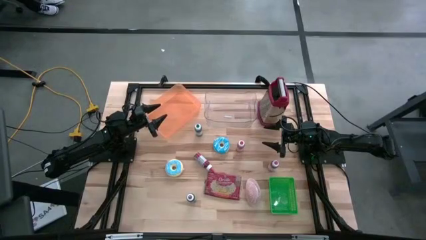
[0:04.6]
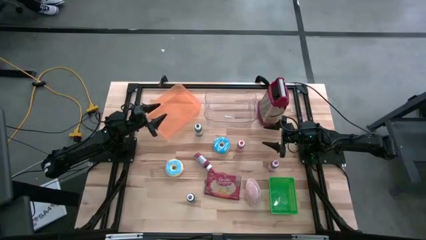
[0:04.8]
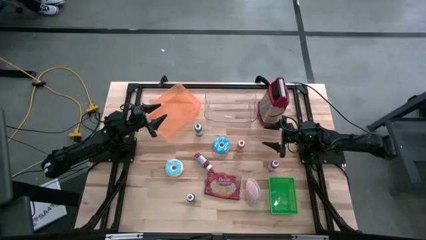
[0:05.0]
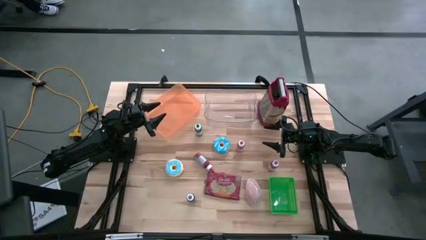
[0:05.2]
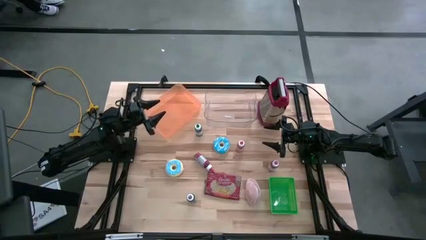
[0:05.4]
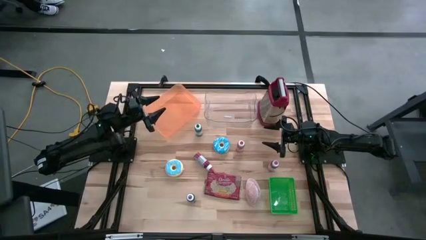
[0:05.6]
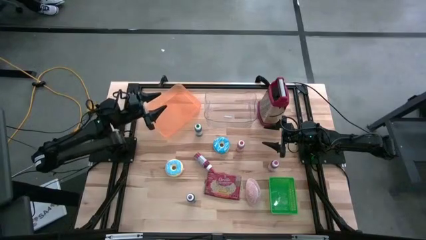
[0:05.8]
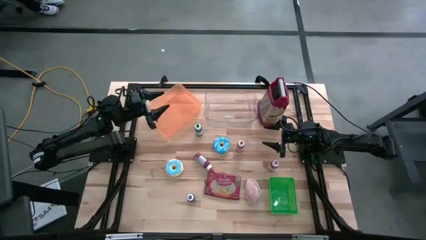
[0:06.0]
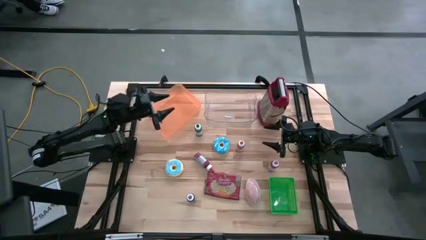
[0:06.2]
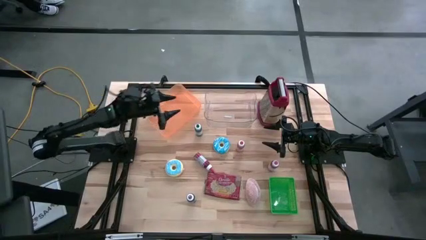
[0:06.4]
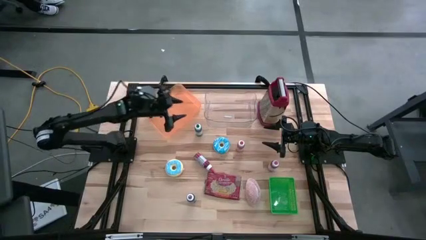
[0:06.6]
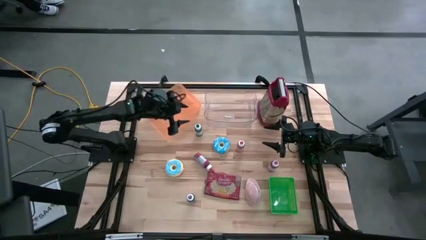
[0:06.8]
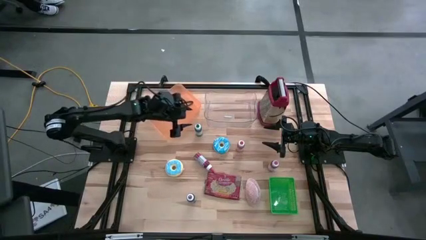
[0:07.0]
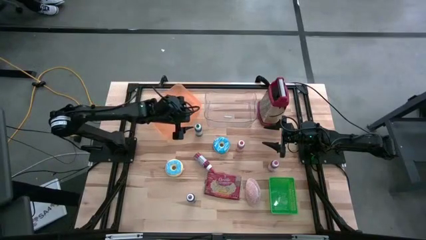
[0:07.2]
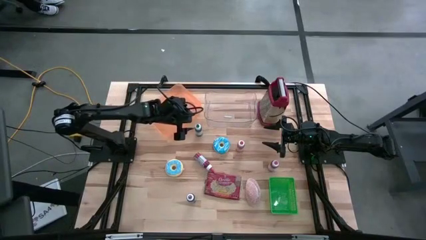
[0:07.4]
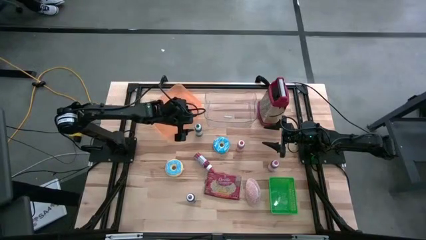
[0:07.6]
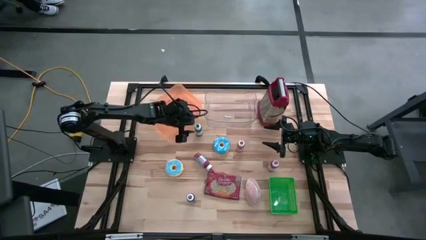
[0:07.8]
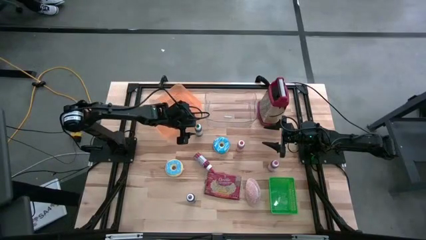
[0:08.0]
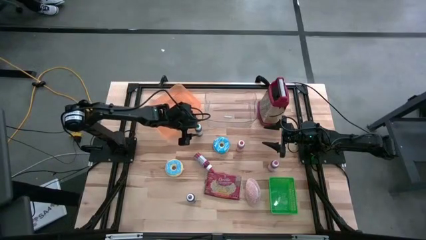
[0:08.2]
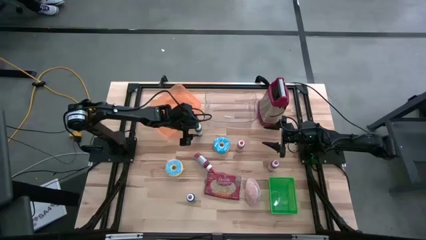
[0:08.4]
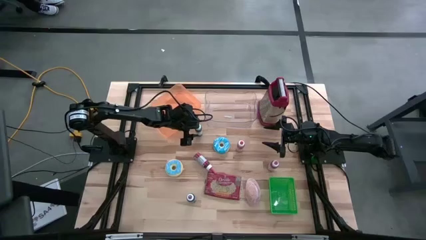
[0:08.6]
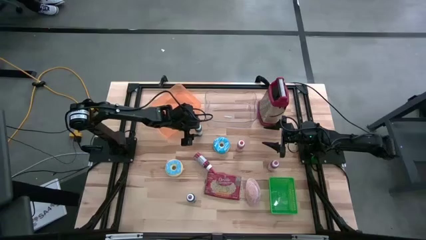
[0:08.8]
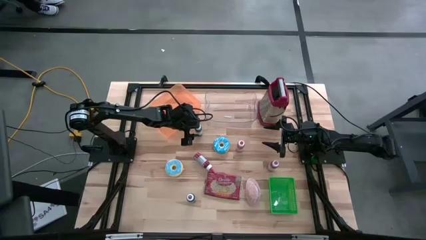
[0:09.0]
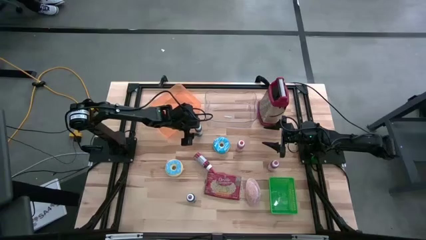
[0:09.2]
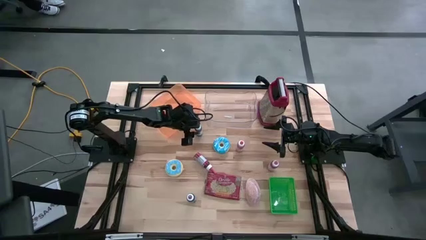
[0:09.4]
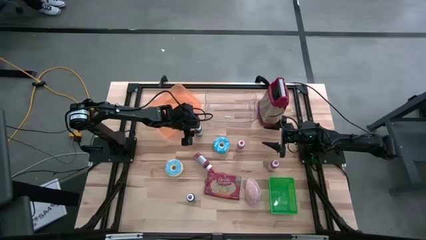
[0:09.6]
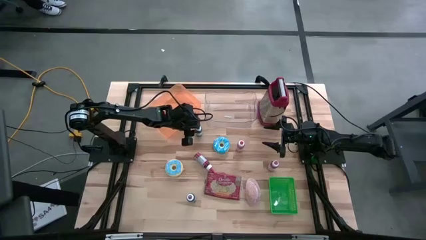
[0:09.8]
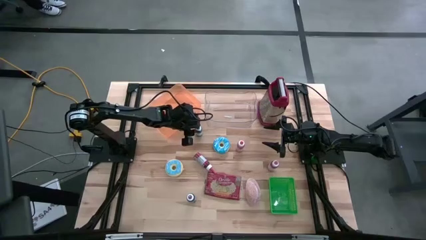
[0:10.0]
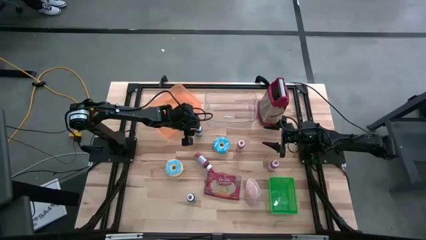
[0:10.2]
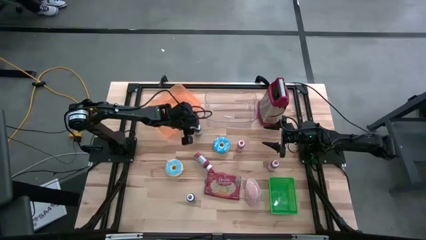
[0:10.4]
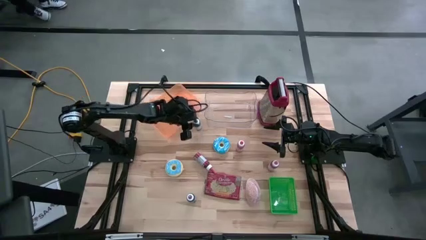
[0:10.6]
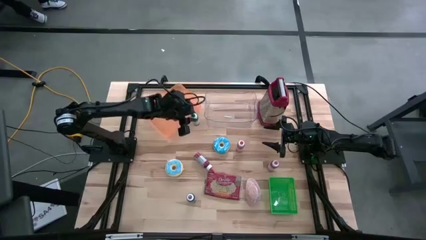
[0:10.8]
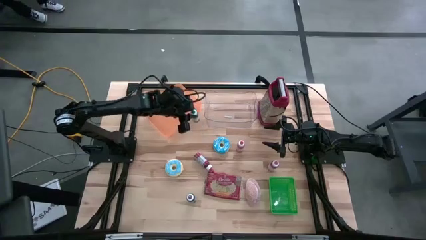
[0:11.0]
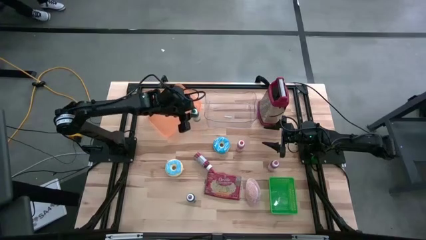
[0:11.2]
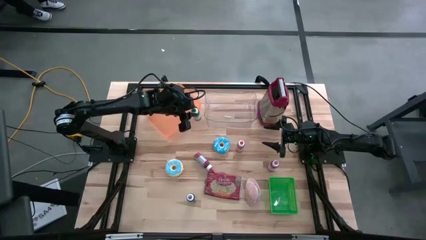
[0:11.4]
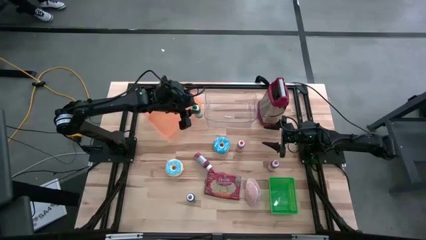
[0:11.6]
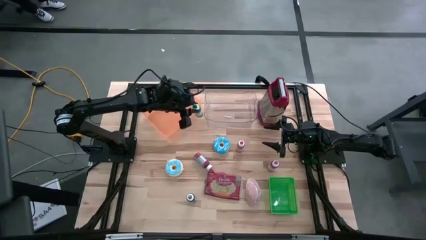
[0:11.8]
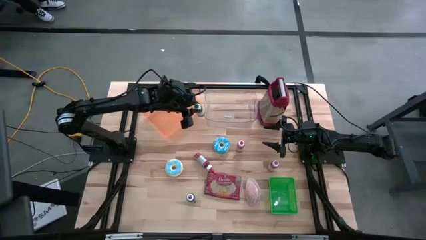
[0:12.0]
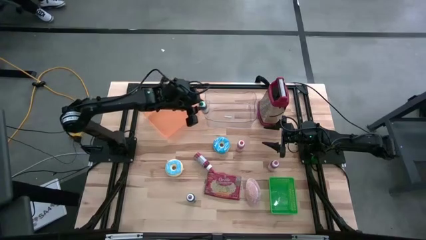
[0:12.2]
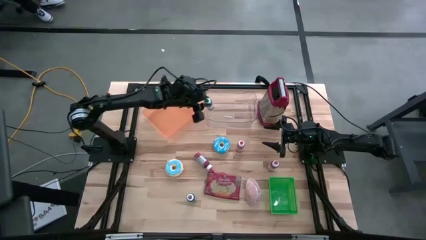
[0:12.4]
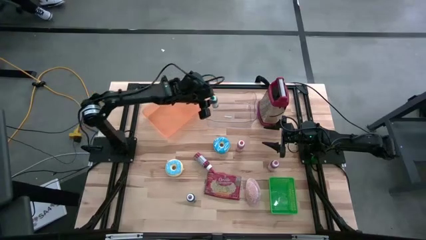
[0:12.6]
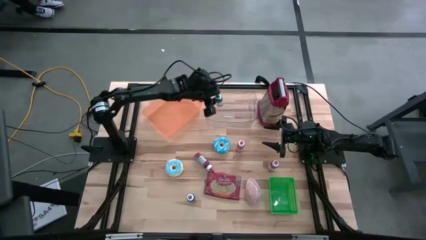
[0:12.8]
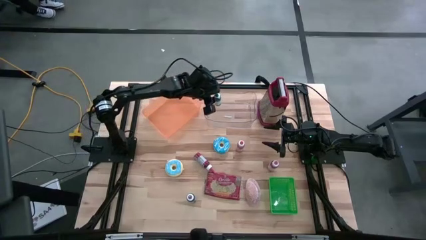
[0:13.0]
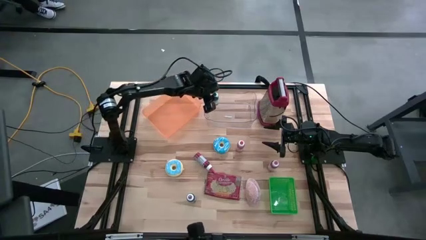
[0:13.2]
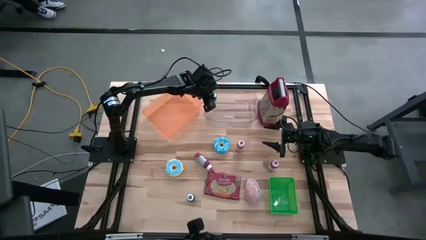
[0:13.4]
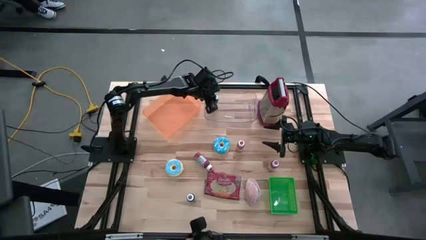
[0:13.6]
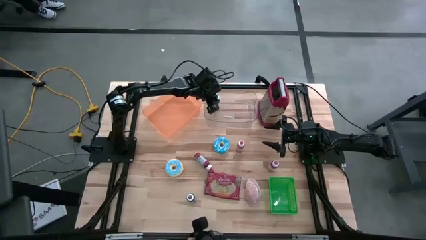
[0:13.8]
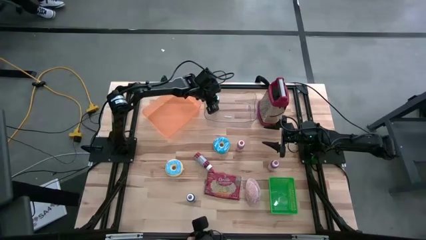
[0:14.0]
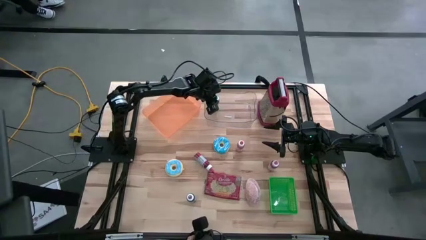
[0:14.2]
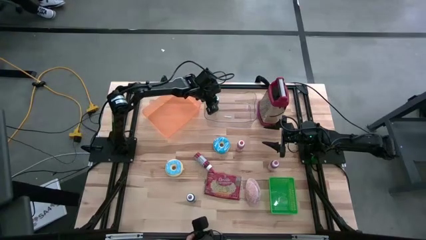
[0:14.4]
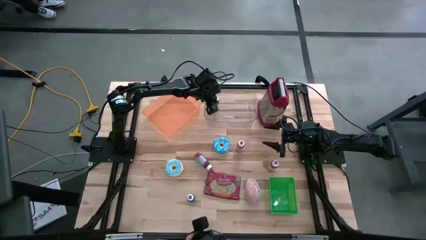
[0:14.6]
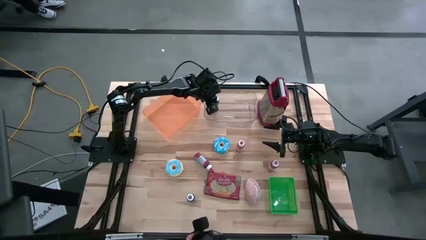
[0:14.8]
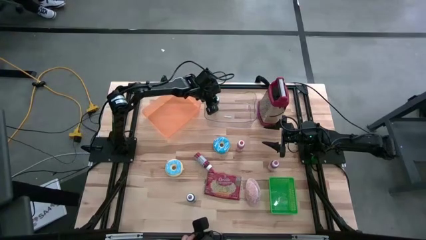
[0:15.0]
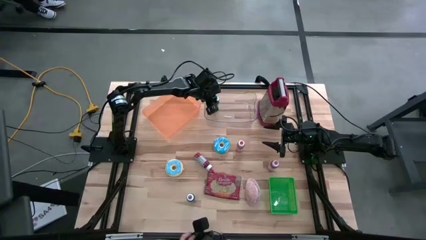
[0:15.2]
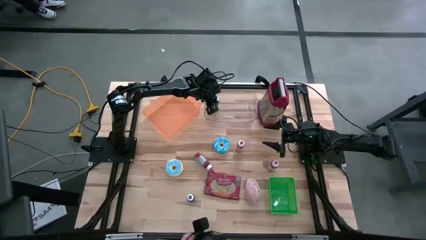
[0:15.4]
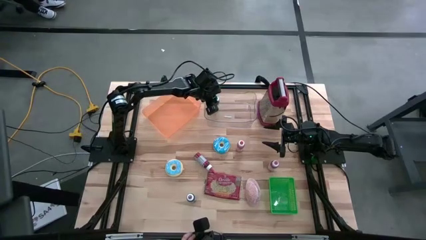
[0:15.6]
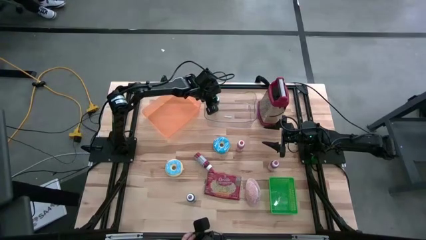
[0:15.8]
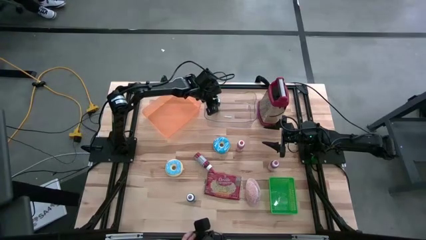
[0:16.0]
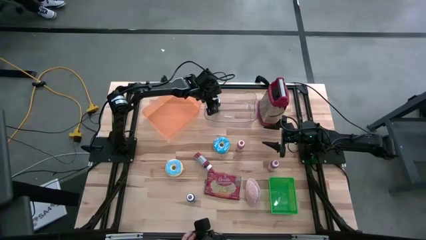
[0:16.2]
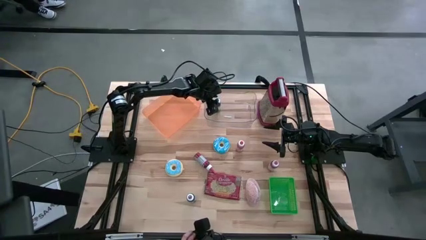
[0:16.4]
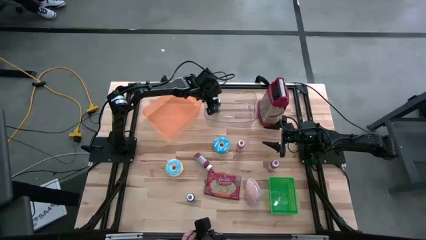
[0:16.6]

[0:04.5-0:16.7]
Put the green food coloring bottle into the transparent bin

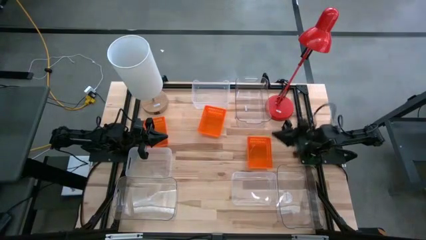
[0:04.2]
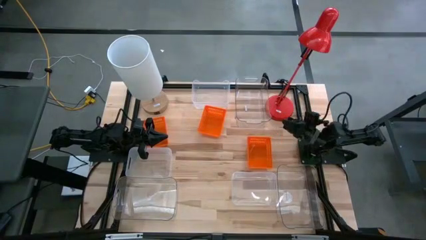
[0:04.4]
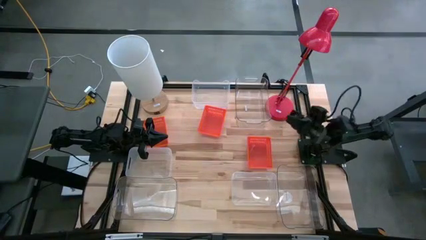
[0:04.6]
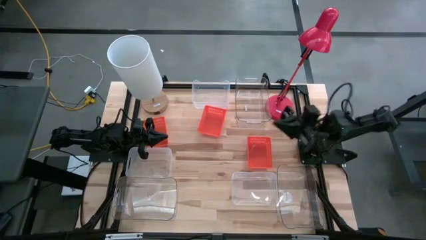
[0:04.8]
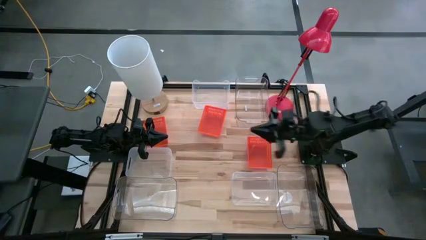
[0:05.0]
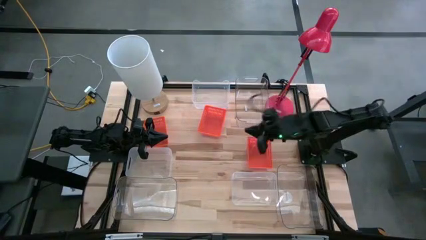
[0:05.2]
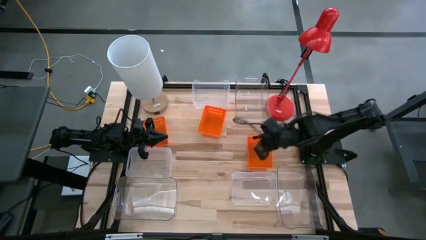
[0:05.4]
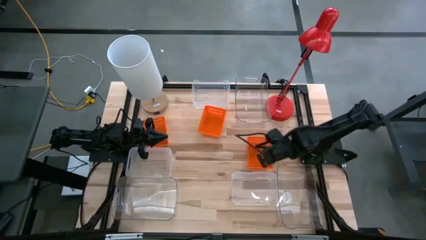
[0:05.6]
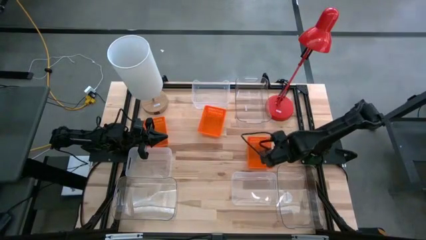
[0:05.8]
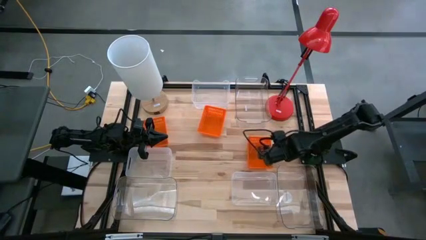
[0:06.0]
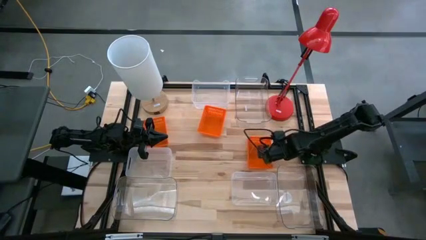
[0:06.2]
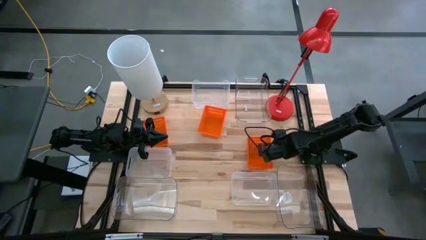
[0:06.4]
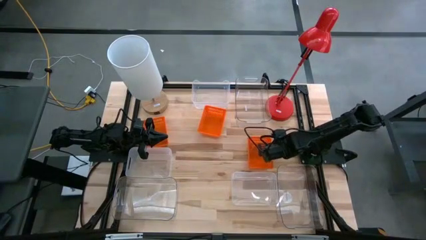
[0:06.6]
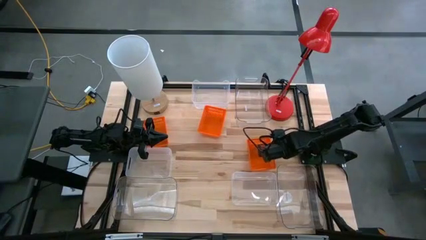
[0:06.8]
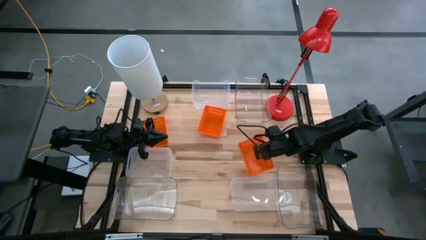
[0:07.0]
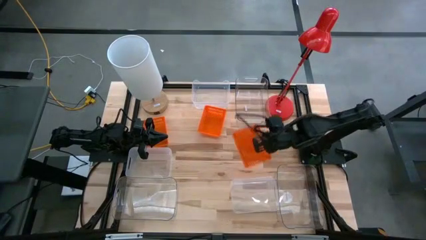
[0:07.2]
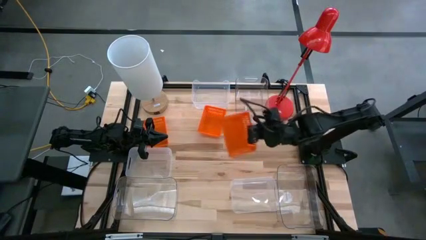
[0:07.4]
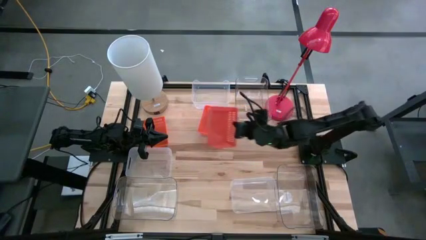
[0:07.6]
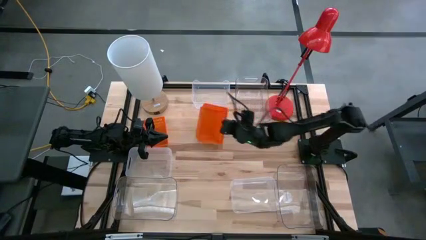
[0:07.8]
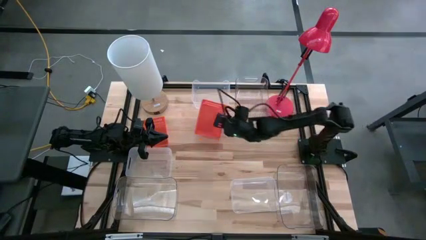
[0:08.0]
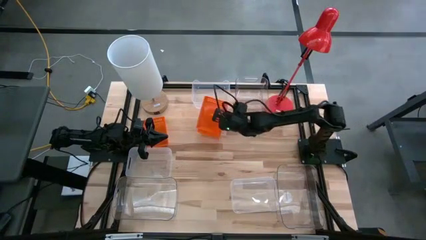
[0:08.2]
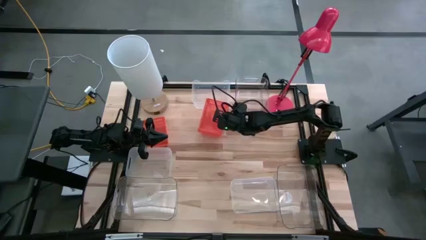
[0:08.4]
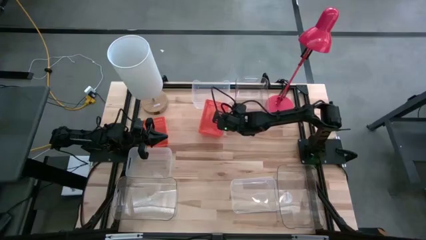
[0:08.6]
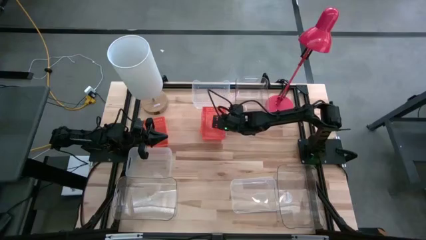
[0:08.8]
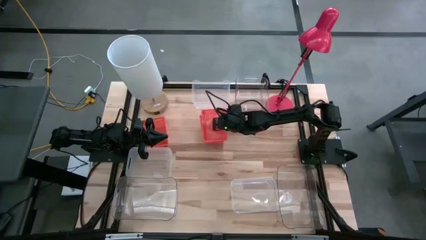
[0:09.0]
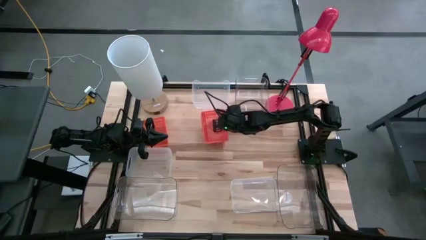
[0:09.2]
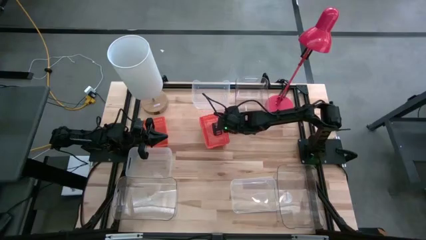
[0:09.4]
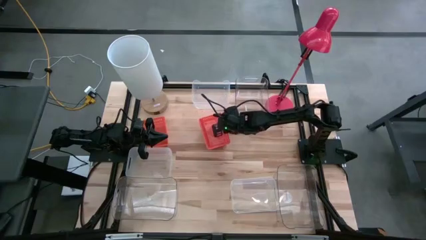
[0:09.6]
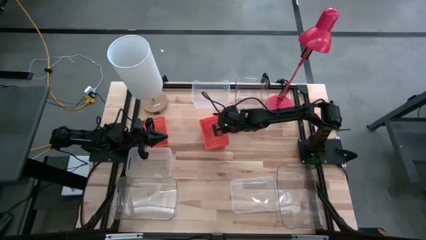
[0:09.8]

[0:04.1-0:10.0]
Stack the right orange bin on the middle orange bin
